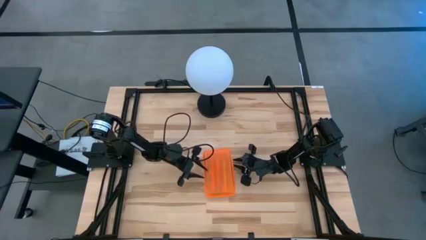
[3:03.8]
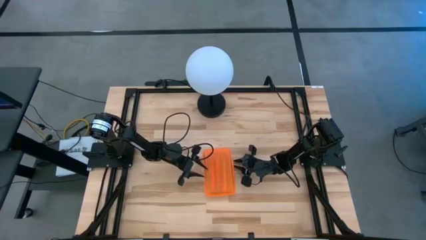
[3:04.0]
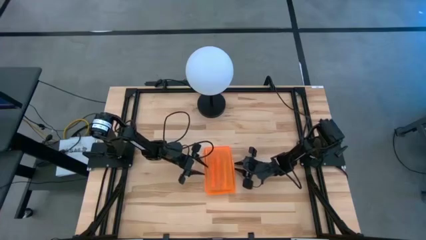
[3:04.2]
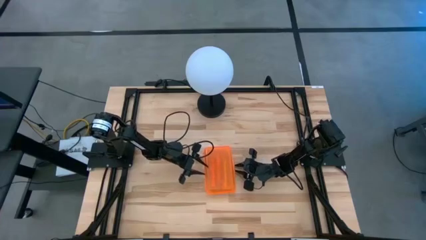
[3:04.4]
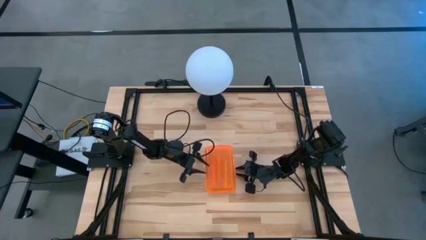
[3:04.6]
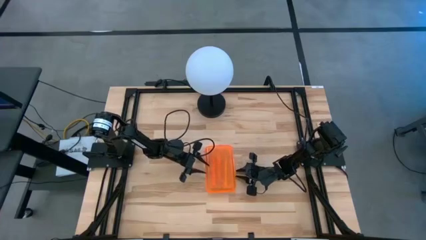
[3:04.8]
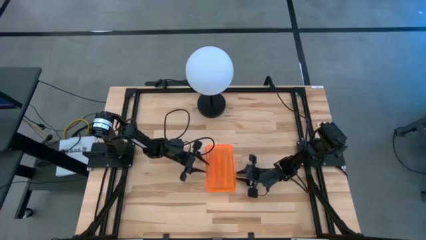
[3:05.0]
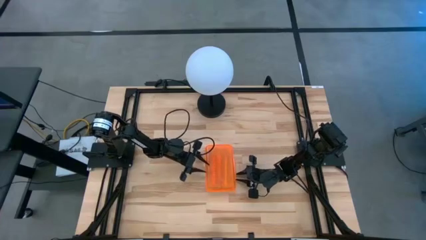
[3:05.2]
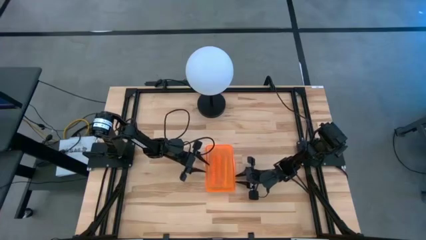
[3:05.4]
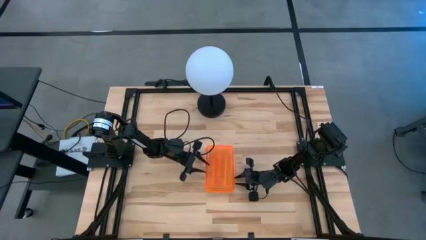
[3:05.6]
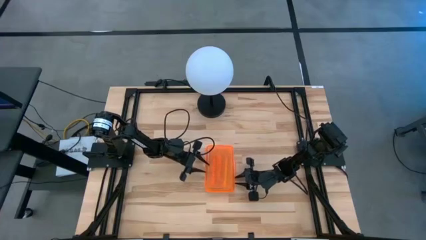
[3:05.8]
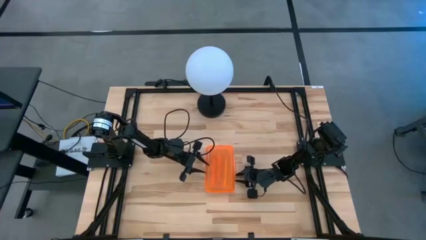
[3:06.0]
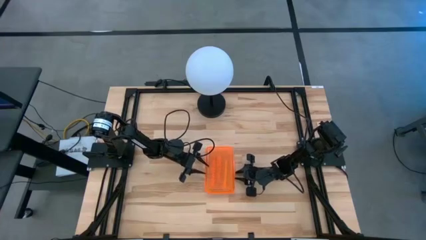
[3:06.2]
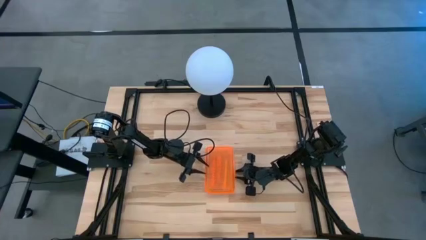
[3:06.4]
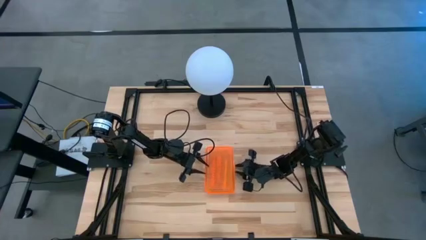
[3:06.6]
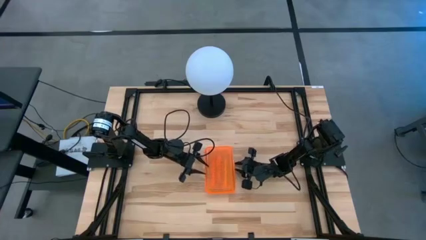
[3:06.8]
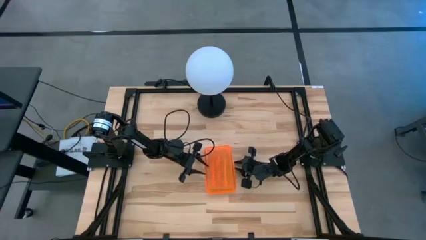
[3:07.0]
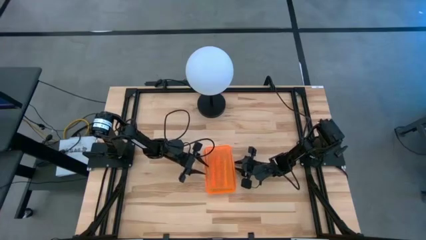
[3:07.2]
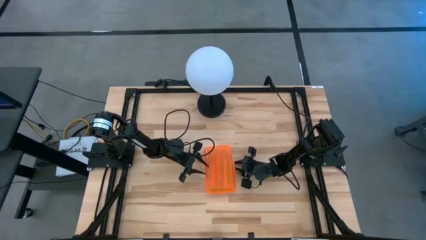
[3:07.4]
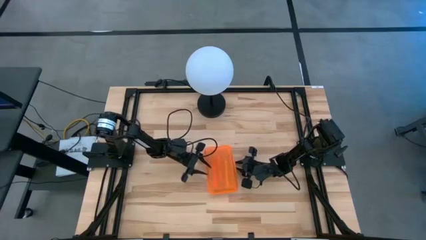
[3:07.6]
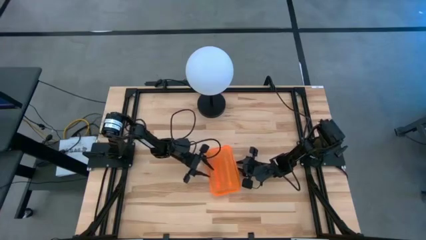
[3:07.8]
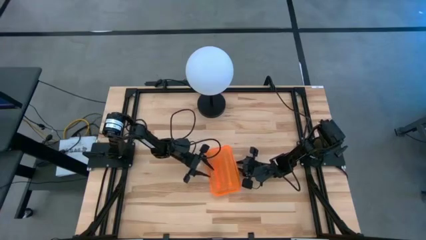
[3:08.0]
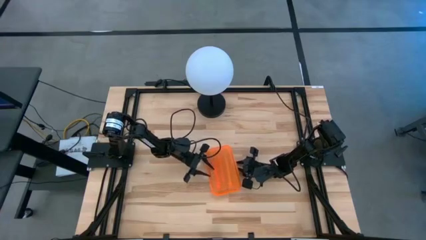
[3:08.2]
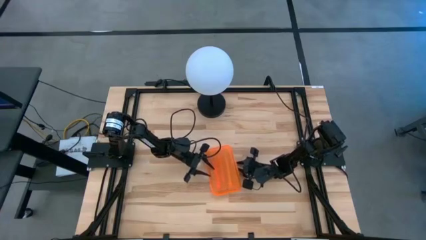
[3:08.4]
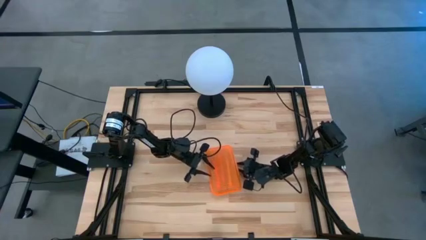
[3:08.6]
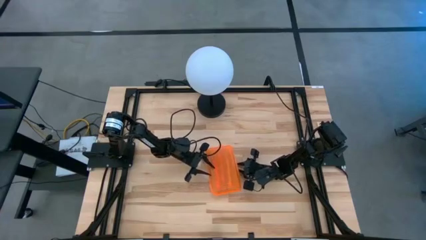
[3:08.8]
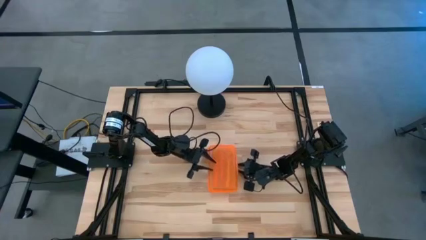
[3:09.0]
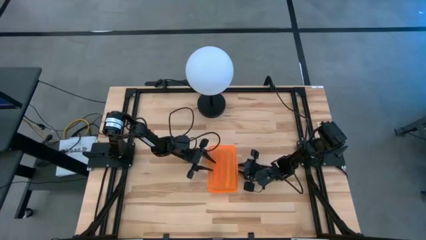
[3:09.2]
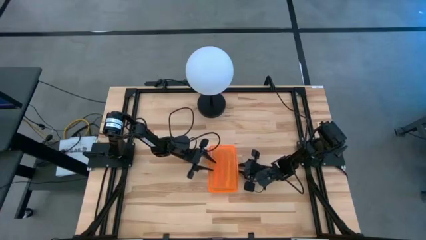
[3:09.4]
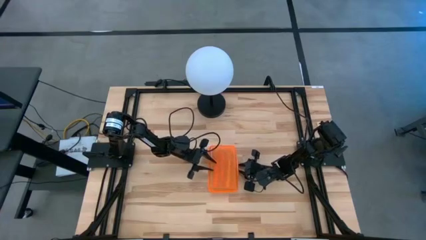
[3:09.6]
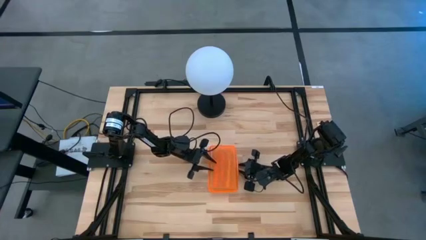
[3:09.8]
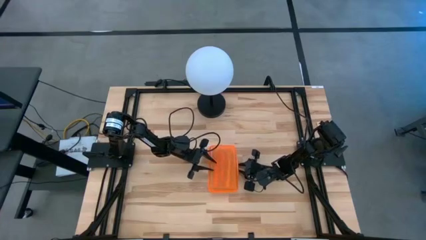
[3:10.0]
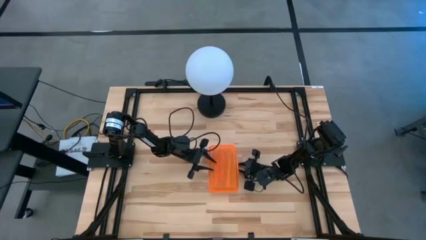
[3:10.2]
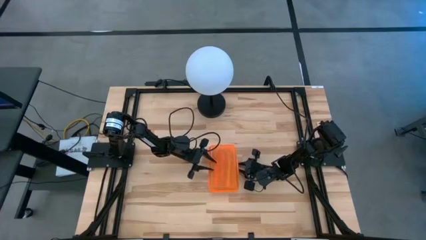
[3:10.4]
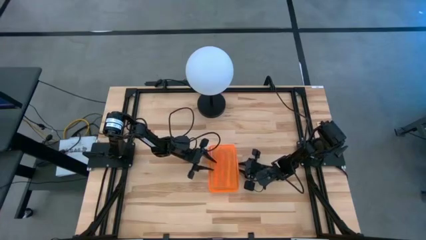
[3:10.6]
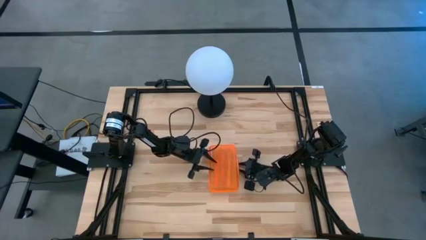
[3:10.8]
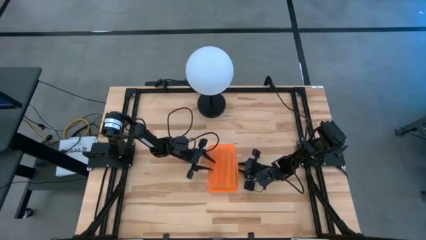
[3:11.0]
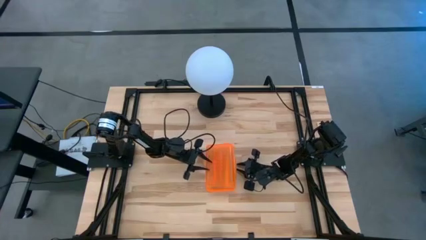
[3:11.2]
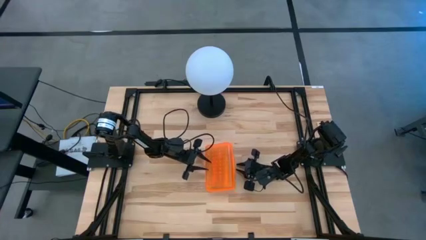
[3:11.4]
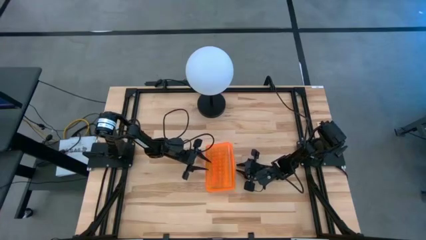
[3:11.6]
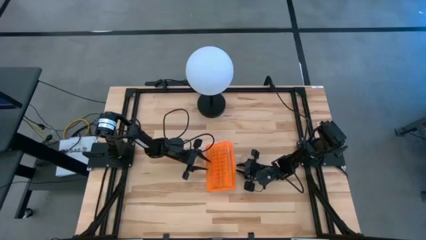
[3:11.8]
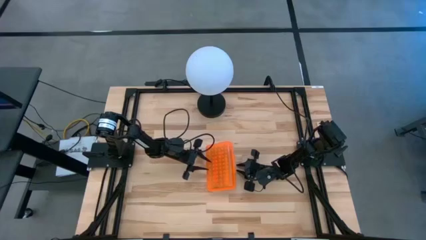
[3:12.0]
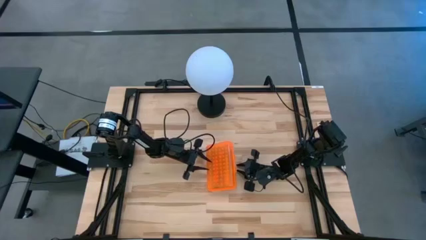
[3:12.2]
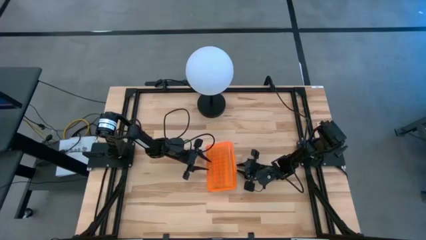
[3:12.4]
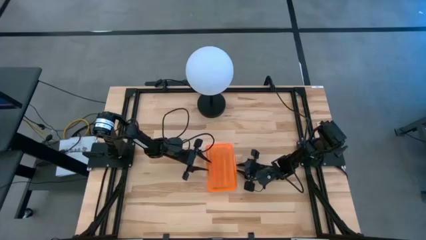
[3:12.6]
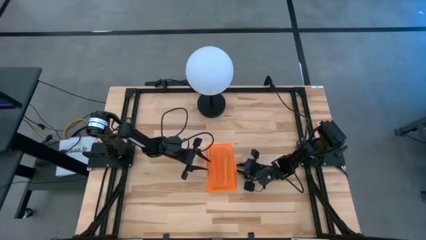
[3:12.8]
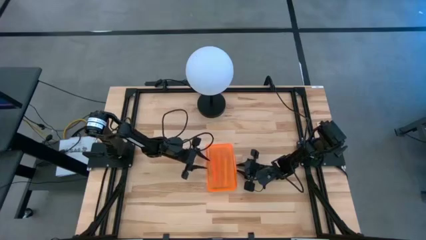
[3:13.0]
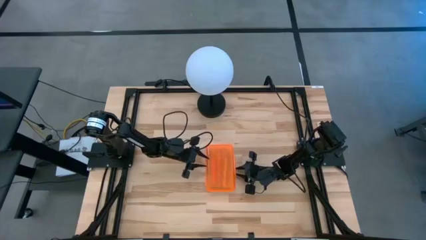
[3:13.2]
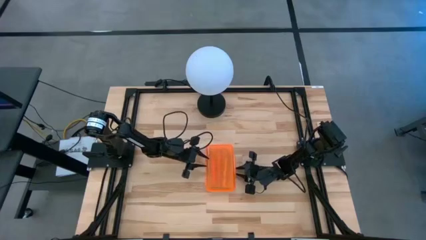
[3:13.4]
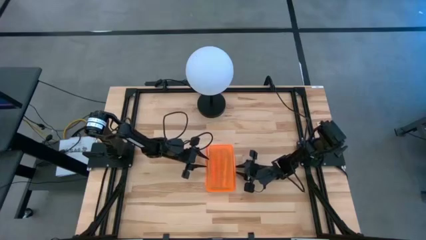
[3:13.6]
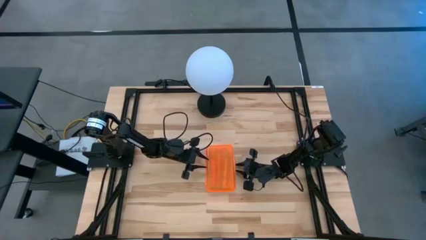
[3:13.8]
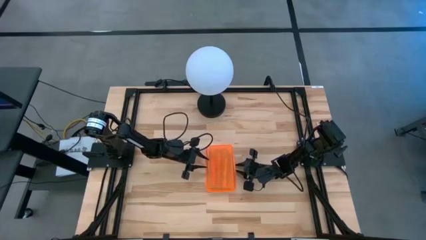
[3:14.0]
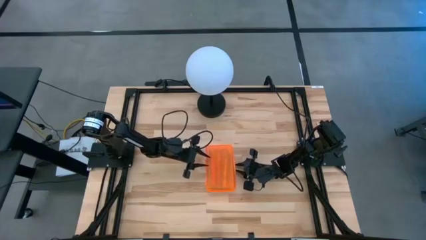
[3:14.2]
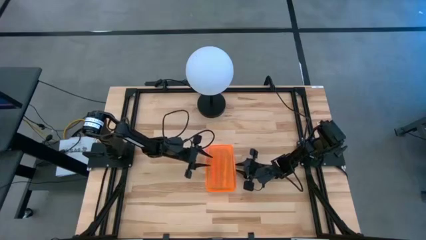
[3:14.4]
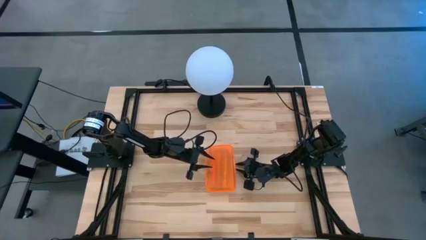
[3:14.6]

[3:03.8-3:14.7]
Task: Pick & place school supplies into a supply box
Close the orange supply box

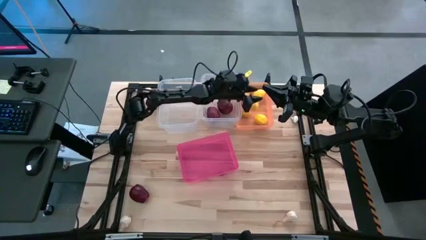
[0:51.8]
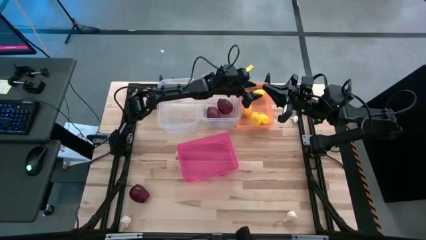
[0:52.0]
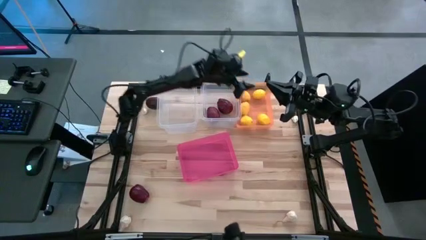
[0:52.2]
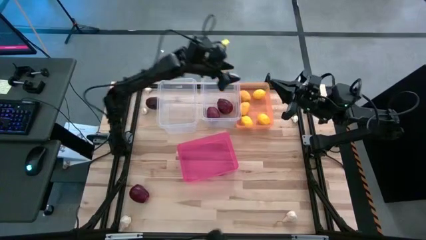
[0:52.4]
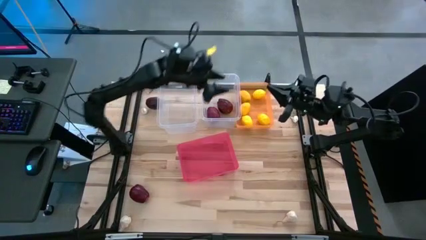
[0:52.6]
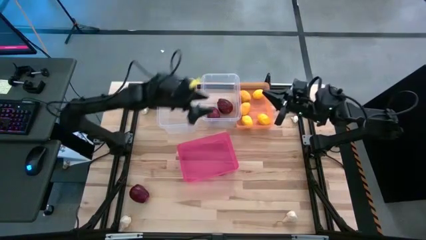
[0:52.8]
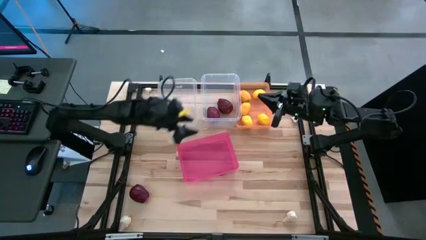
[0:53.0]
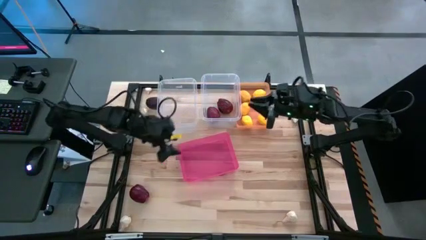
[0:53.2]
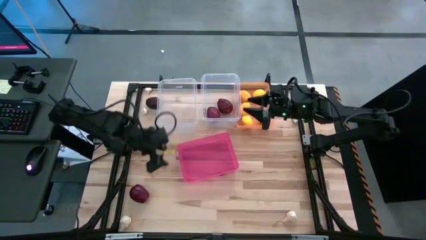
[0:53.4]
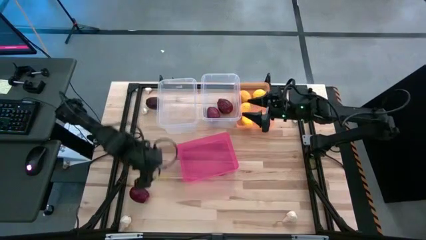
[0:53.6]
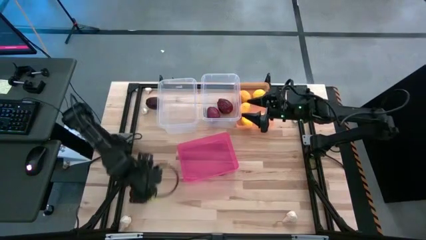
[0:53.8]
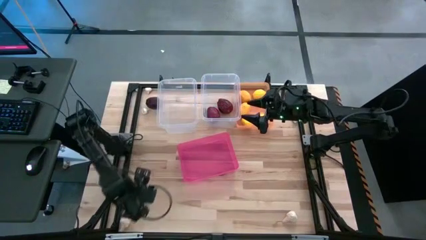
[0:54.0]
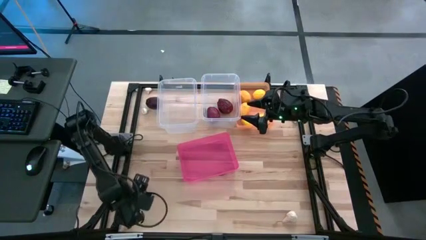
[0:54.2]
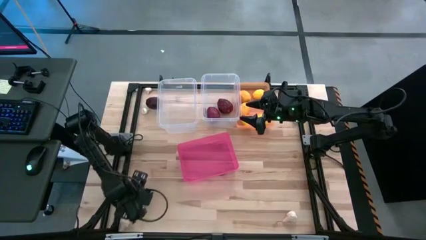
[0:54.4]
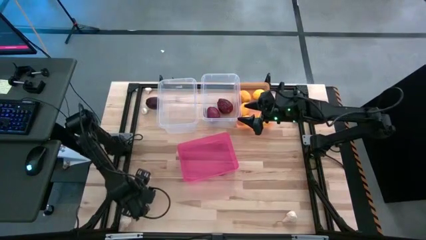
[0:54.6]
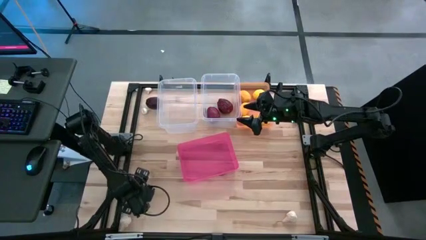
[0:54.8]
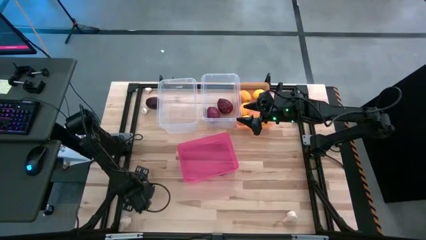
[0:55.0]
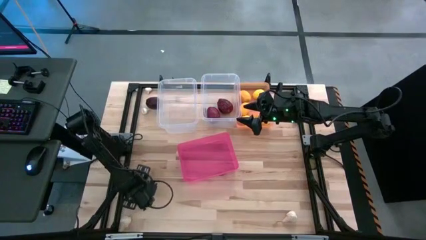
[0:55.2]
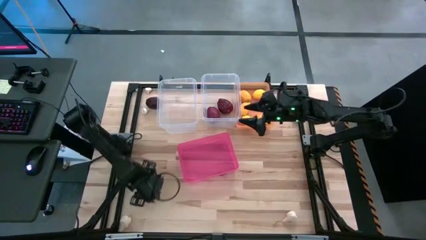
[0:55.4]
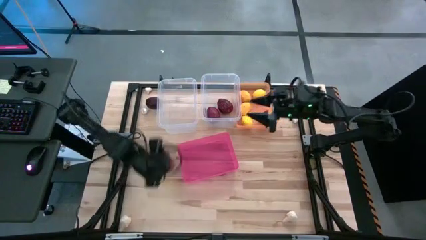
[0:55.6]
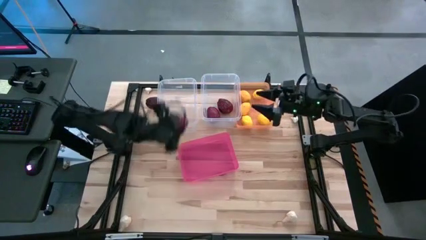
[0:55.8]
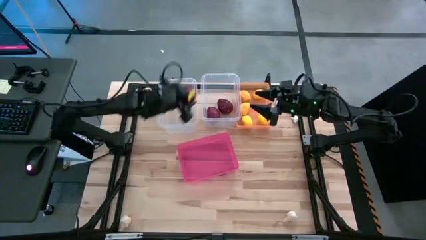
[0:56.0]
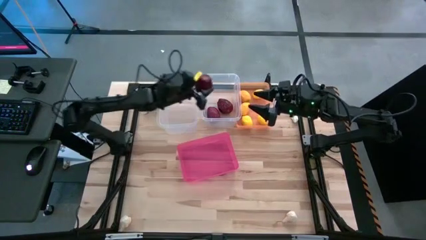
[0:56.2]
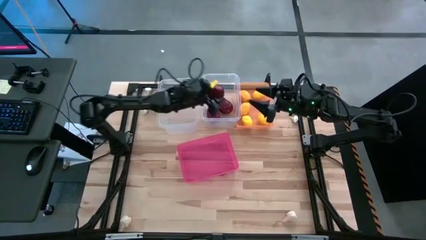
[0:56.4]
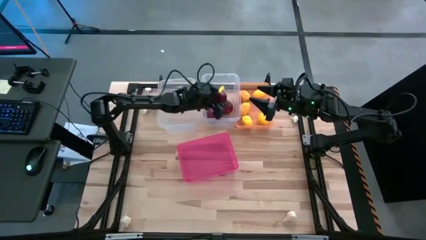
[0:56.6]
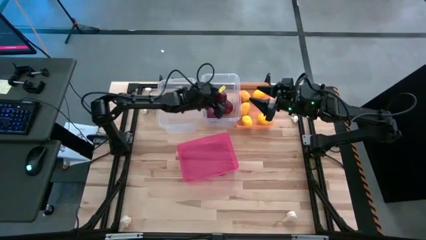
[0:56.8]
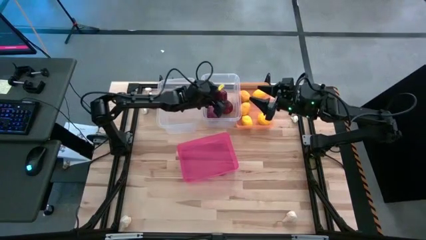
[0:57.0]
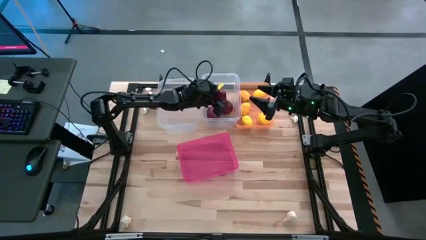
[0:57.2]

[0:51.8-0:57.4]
Task: Sort produce into baskets
Put the red apple into then right transparent bin
